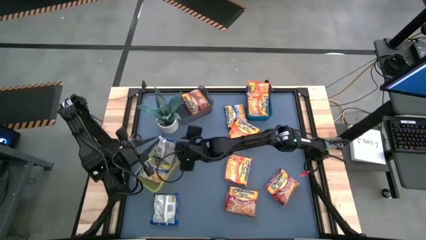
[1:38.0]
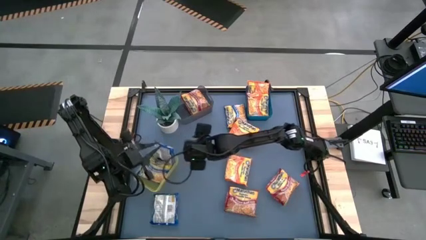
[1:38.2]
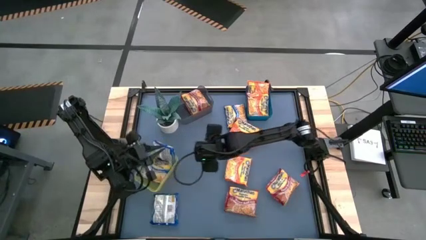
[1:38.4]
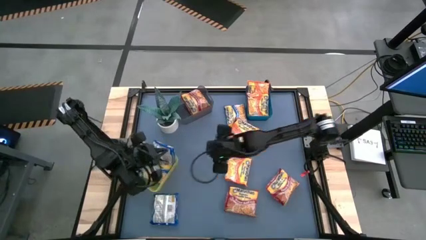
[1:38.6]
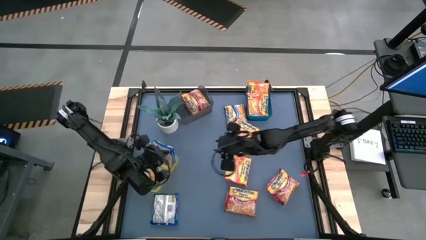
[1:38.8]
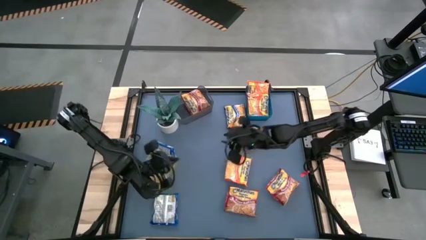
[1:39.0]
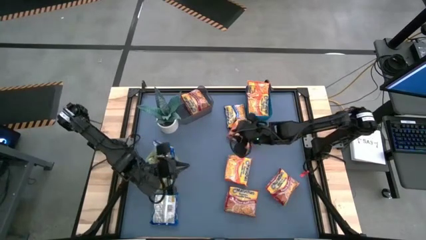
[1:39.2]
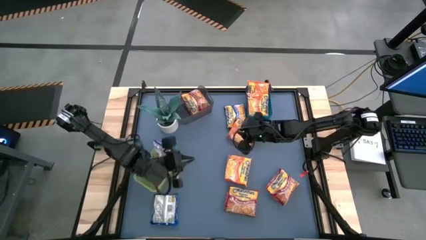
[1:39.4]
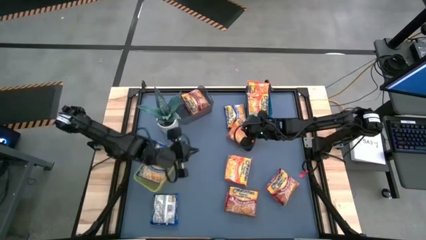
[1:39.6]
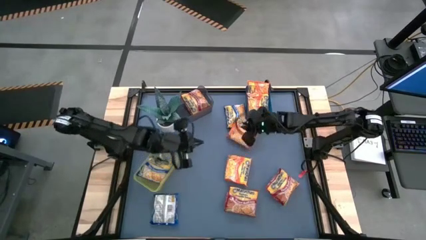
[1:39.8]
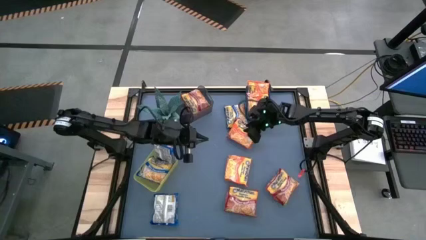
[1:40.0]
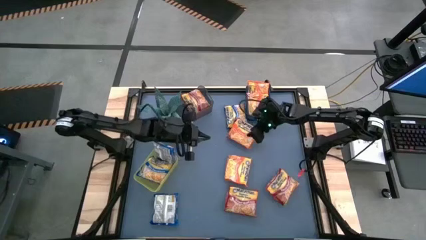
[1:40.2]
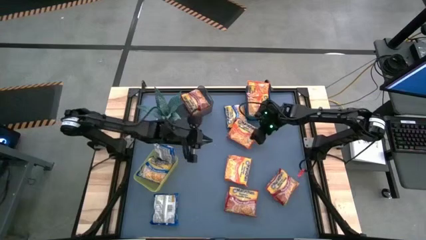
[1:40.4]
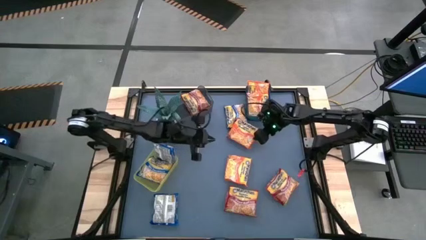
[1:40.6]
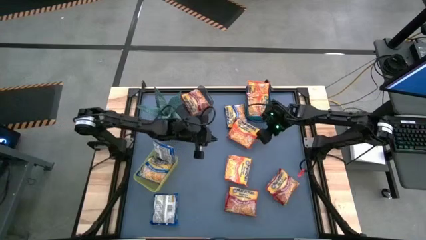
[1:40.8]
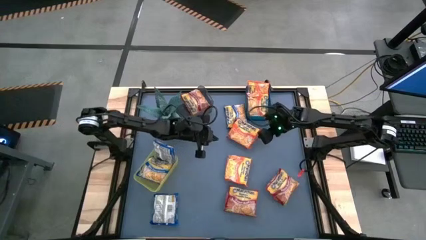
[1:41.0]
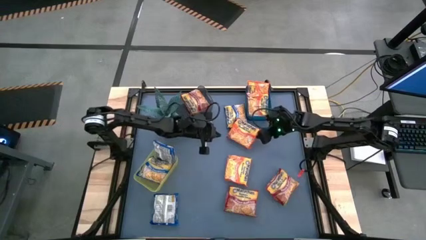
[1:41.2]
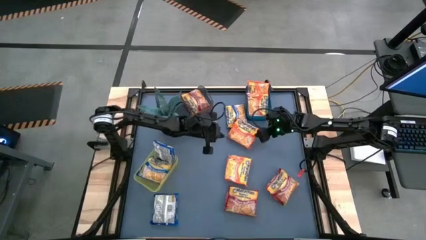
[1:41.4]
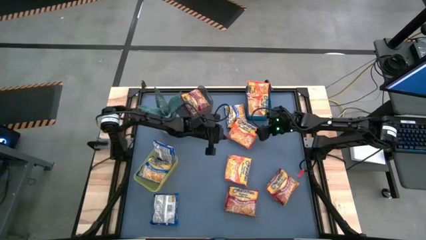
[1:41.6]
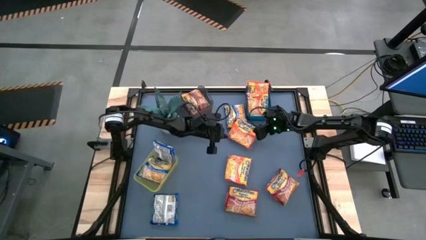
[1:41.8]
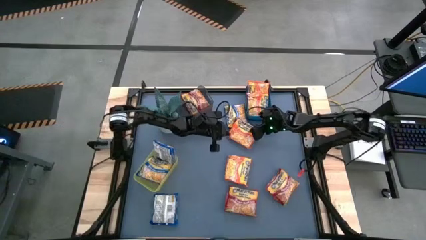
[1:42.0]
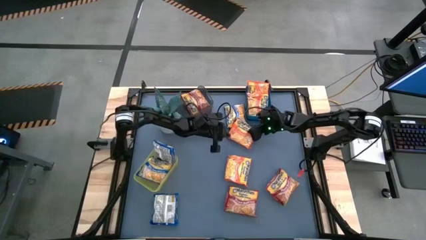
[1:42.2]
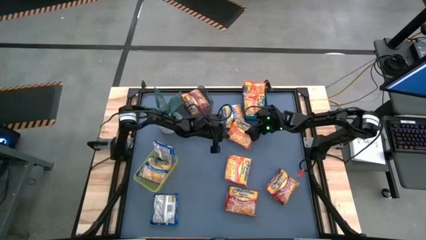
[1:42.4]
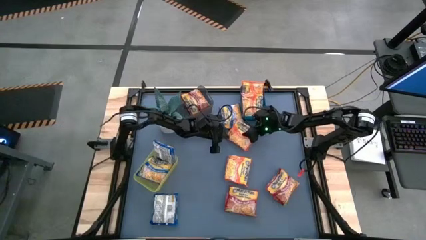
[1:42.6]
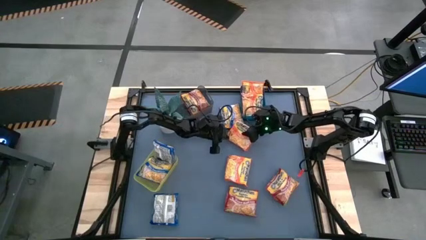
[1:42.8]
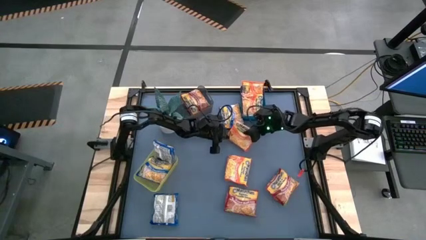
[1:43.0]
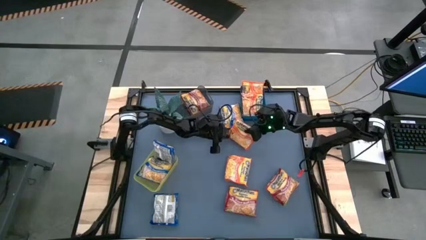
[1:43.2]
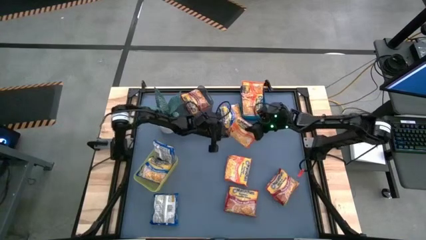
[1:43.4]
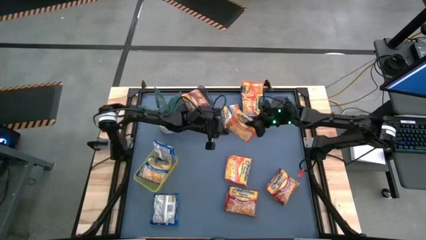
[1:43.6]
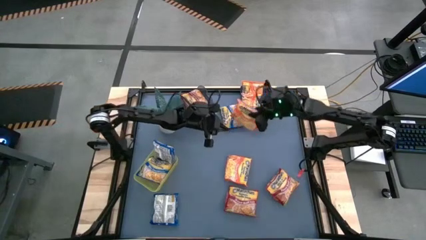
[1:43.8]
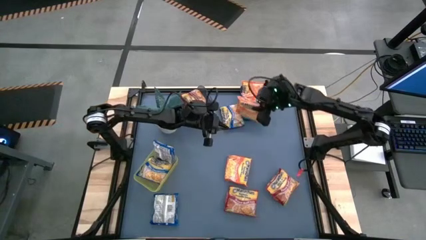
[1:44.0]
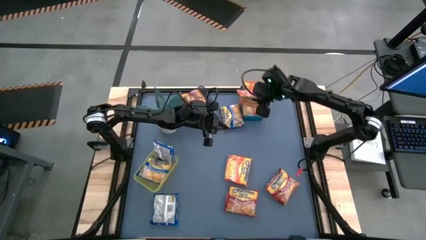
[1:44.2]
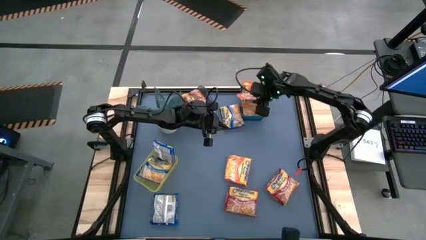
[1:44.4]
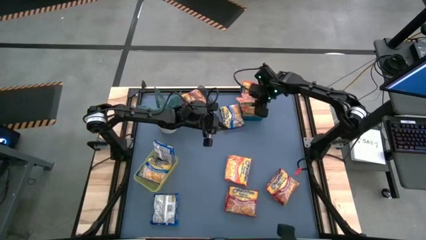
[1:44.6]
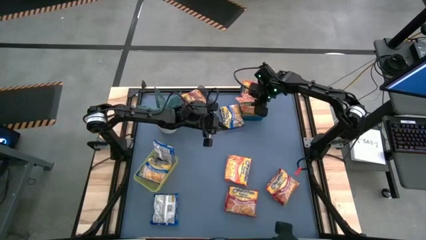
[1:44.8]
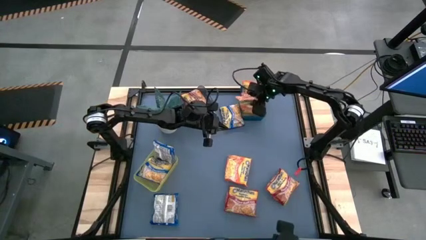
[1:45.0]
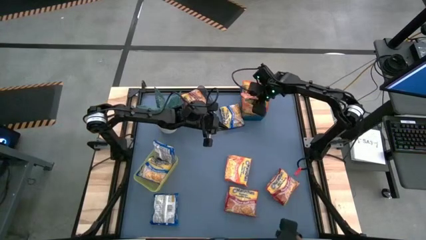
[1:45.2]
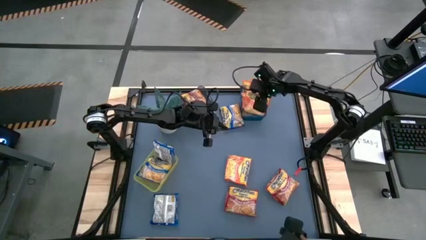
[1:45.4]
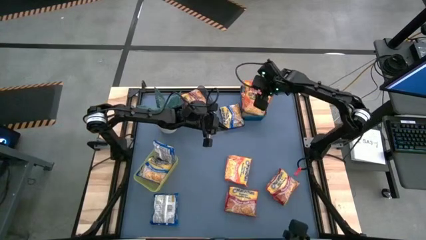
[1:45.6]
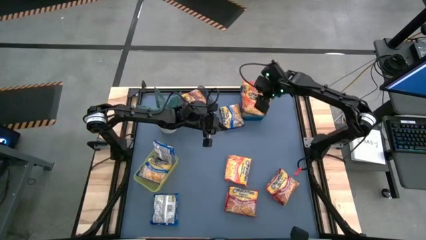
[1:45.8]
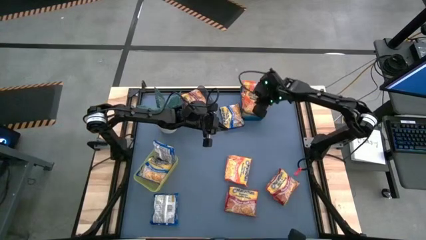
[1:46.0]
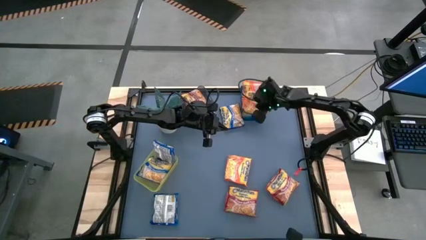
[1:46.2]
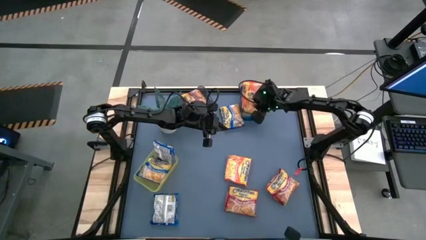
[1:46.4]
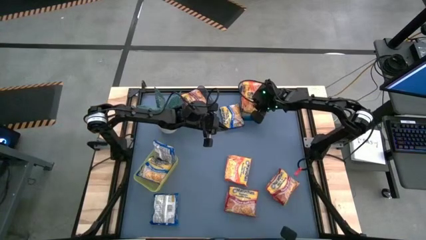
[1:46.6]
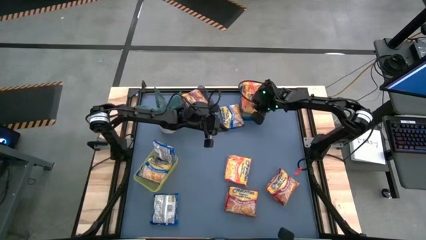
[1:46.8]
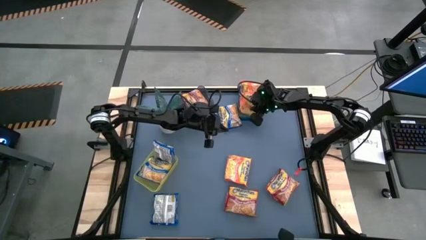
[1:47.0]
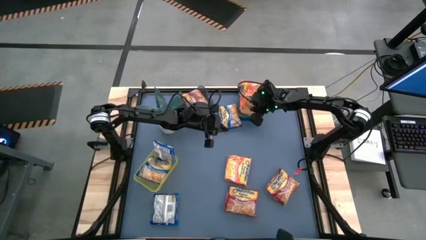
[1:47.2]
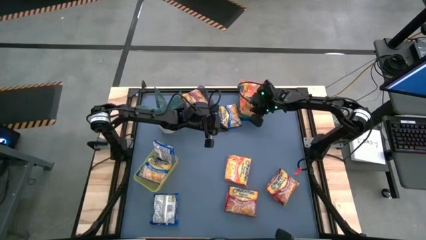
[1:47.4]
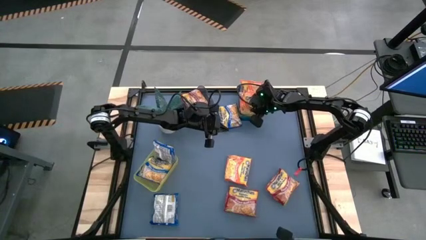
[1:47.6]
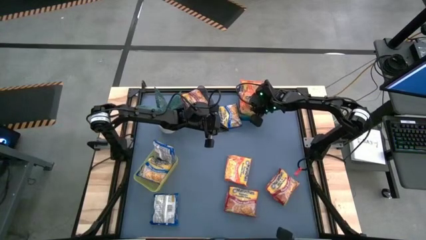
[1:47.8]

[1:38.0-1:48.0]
Task: Sort Maruchan noodles
Put the orange noodle pack into the blue bin

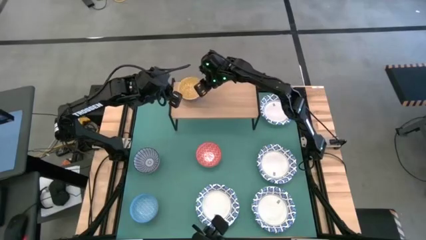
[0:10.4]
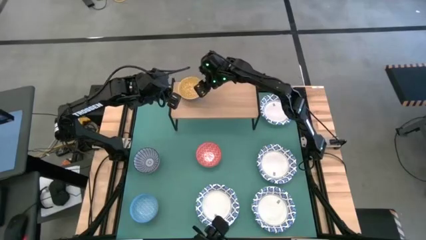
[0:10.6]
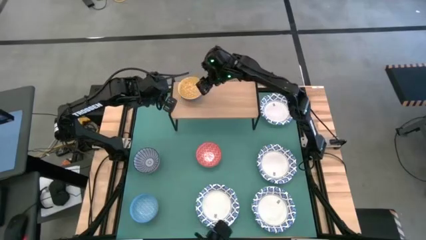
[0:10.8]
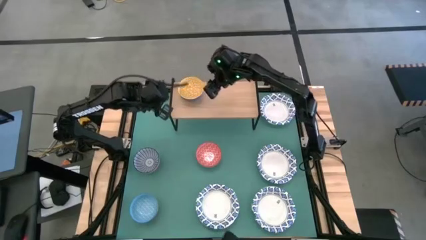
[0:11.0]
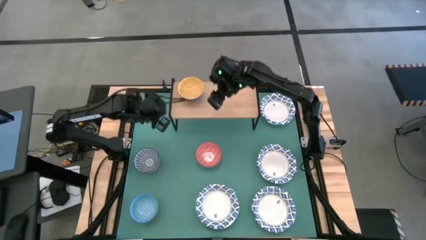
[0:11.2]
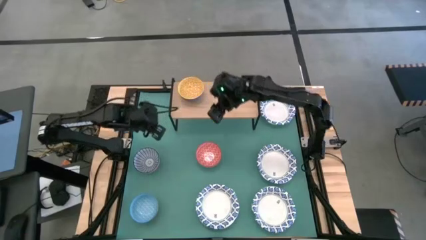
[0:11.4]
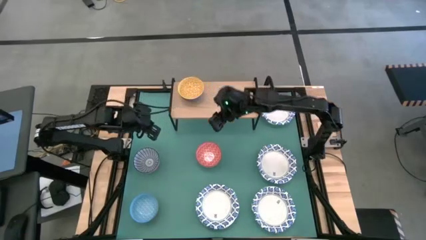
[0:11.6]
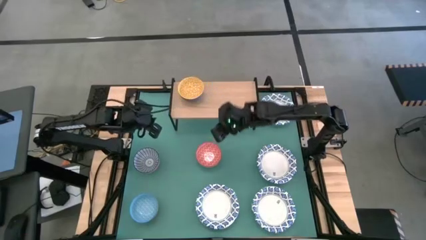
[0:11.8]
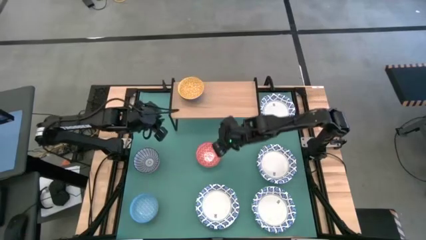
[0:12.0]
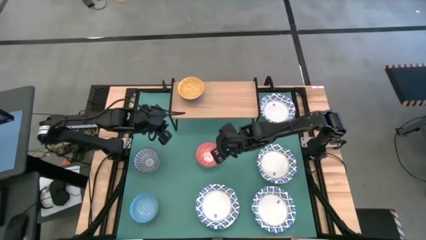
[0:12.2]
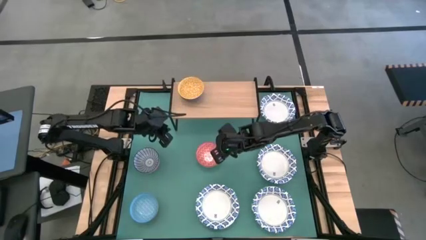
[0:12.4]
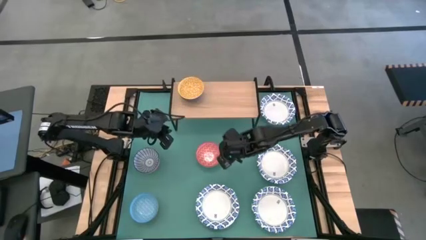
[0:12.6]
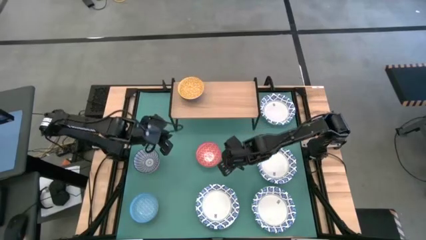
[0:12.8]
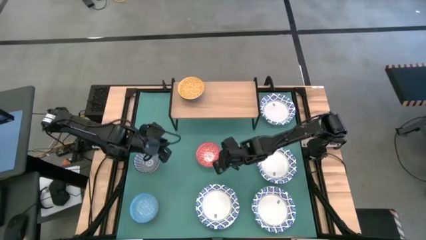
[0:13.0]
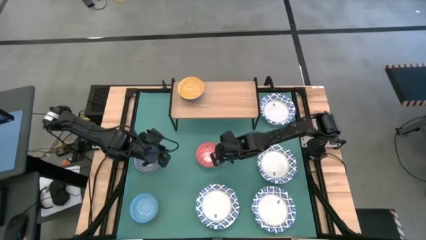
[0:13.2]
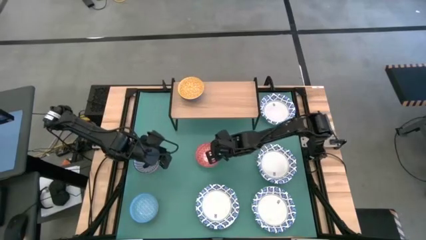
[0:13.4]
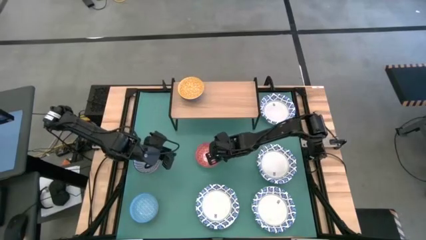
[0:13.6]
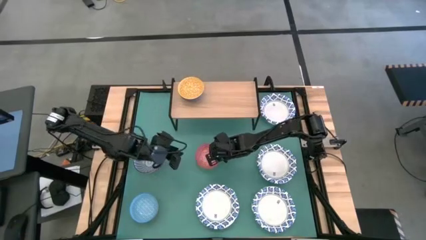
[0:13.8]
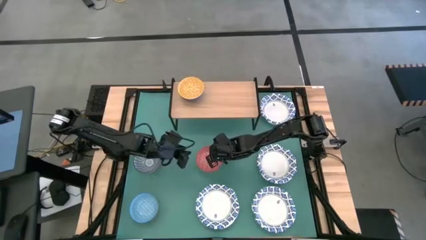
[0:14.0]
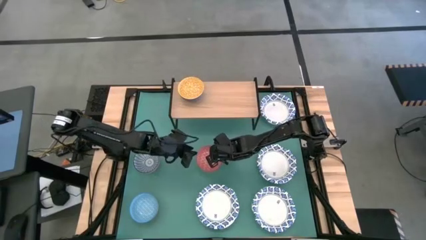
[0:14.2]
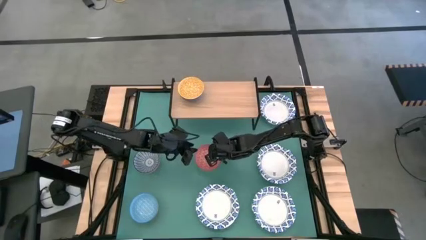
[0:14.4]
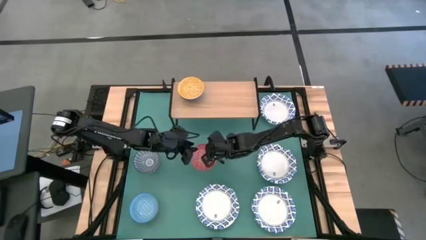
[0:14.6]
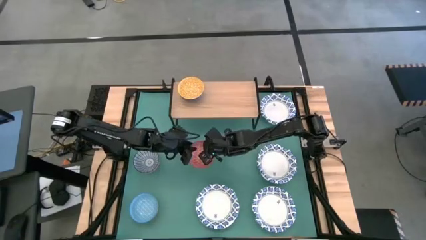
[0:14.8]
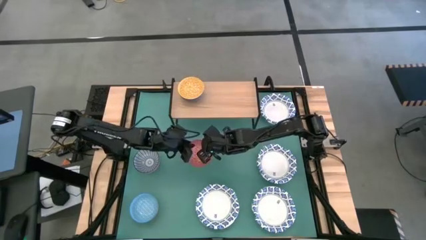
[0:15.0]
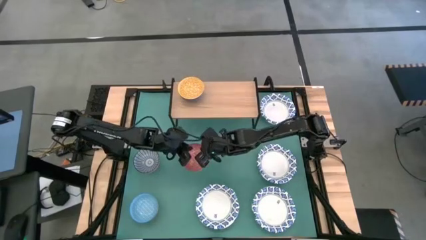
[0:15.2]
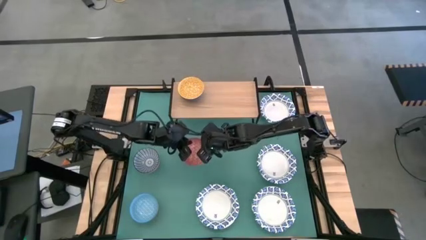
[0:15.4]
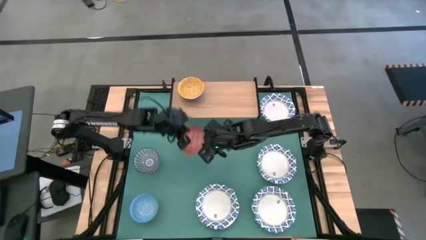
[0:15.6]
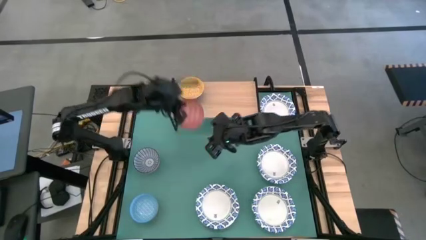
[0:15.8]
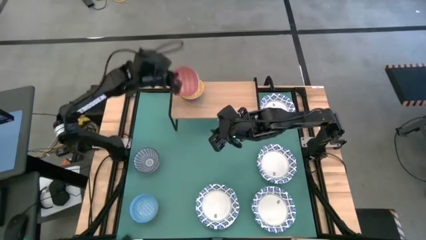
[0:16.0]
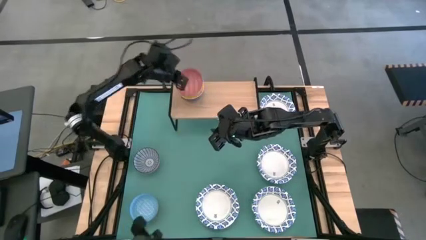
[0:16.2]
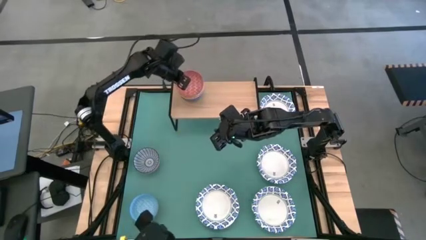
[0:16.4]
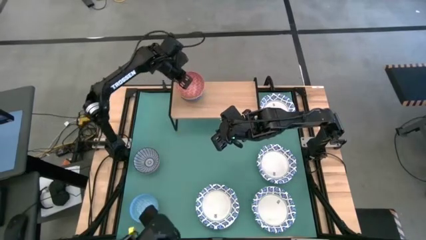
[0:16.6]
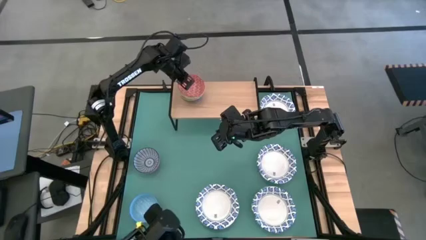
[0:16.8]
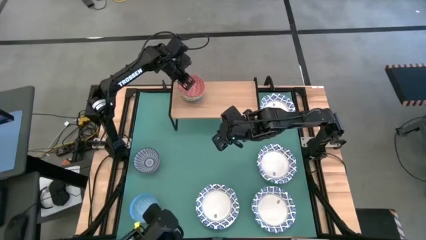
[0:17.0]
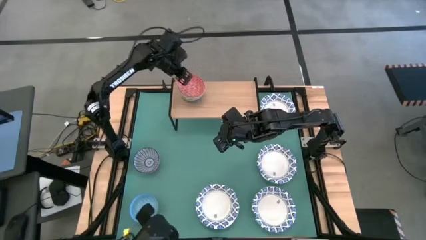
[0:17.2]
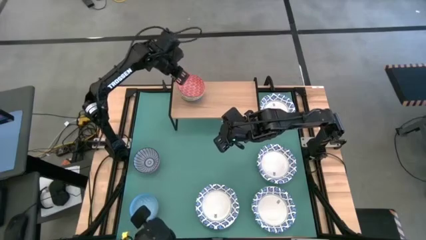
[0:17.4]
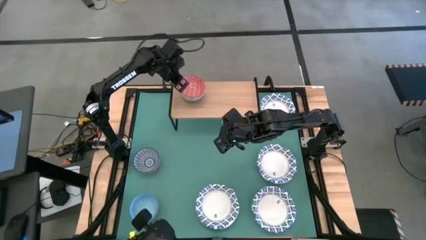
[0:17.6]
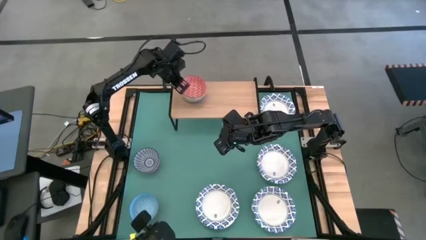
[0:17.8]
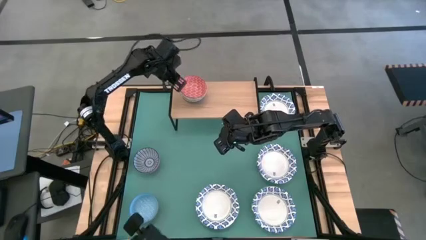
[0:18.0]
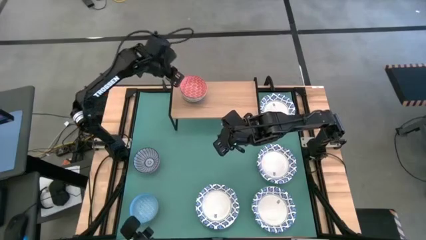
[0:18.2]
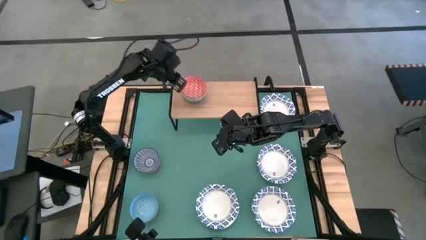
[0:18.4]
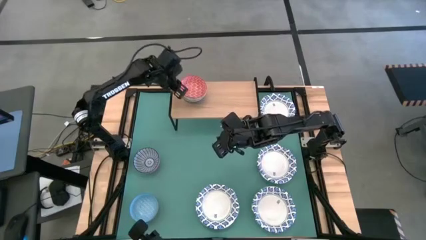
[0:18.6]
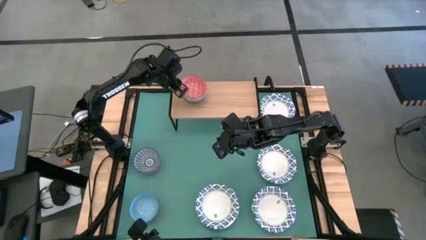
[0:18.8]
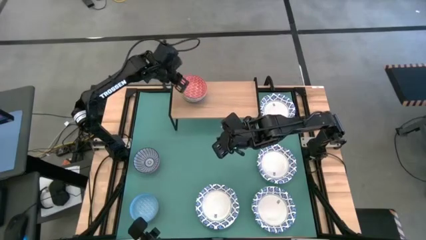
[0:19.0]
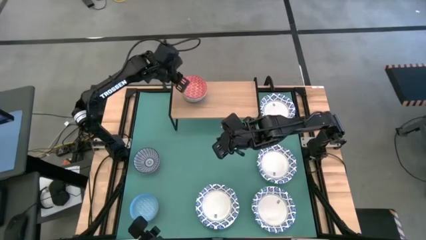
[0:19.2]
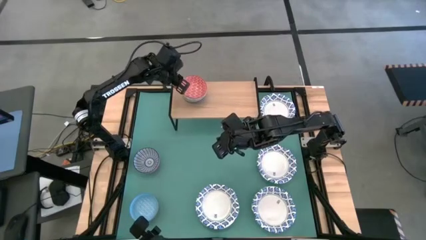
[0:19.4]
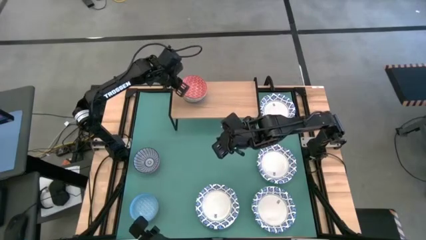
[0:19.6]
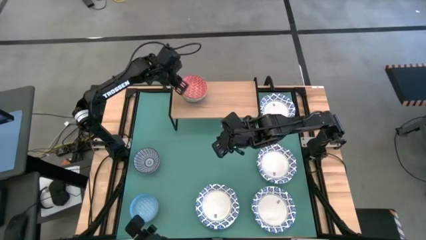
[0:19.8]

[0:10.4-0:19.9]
Task: Place and stack bowls onto a shelf
Stack the red bowl on top of the yellow bowl on the shelf
